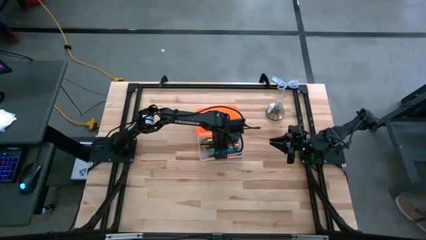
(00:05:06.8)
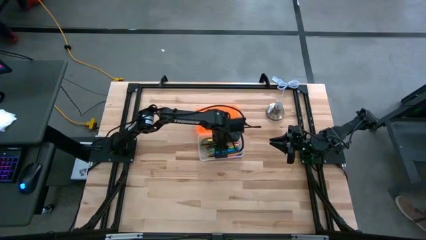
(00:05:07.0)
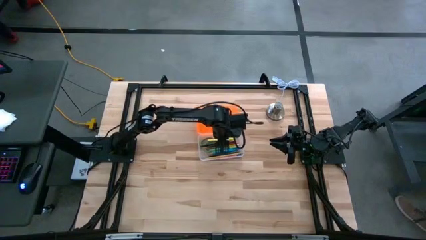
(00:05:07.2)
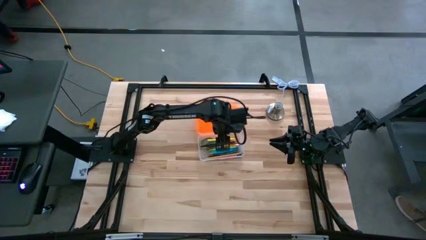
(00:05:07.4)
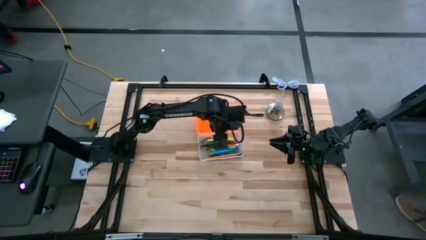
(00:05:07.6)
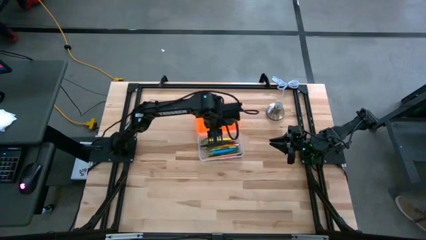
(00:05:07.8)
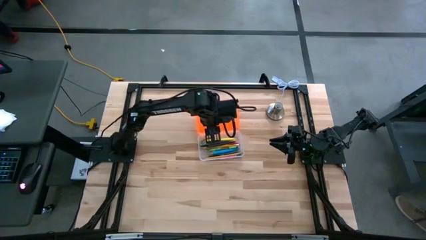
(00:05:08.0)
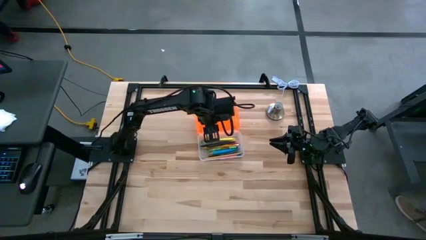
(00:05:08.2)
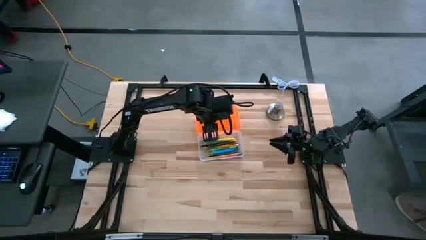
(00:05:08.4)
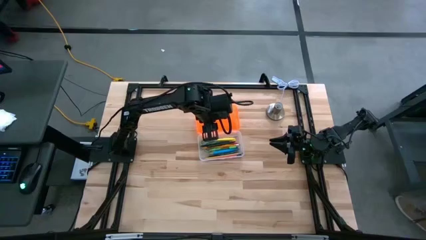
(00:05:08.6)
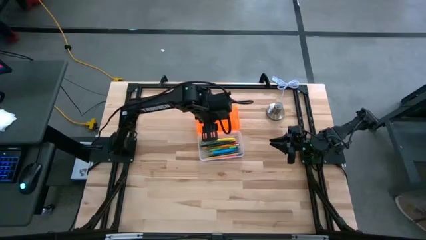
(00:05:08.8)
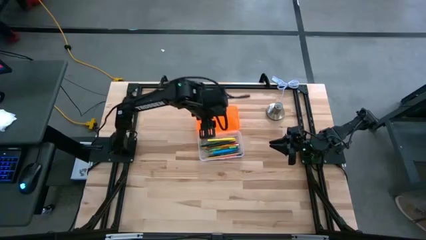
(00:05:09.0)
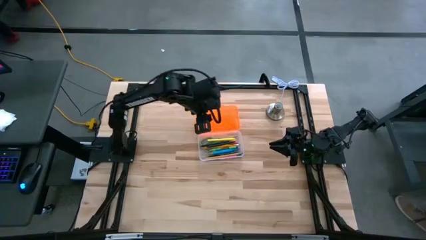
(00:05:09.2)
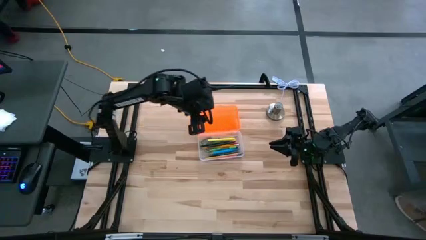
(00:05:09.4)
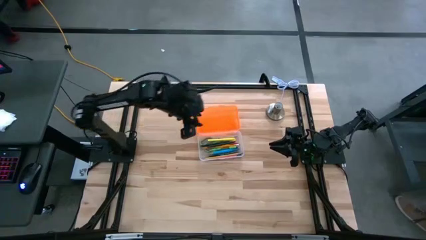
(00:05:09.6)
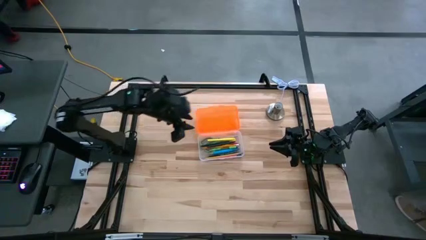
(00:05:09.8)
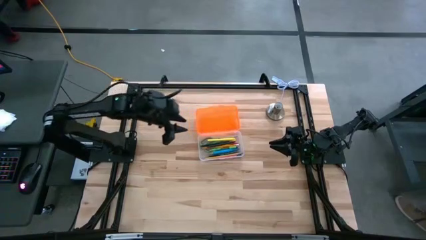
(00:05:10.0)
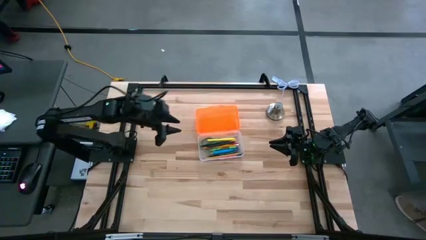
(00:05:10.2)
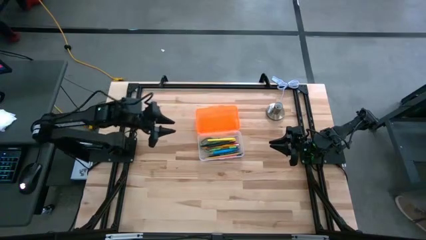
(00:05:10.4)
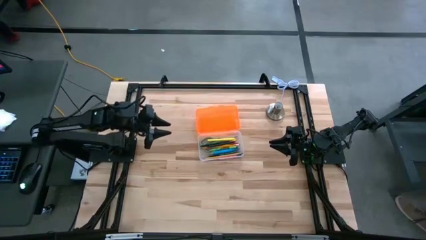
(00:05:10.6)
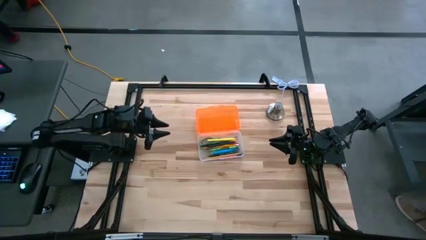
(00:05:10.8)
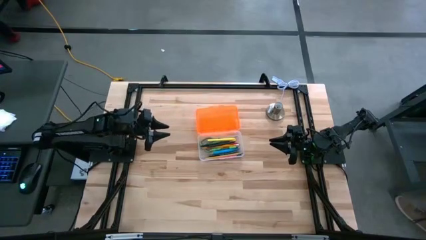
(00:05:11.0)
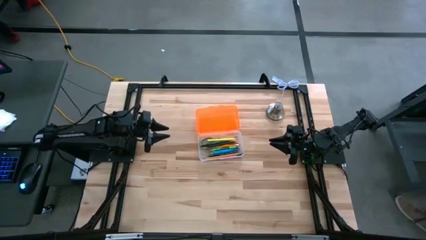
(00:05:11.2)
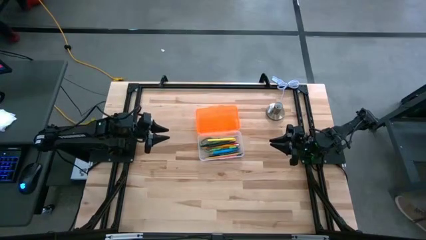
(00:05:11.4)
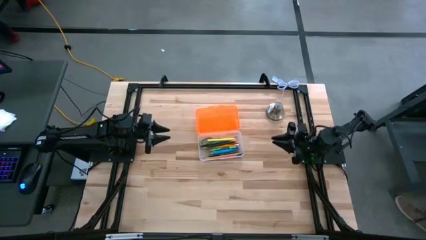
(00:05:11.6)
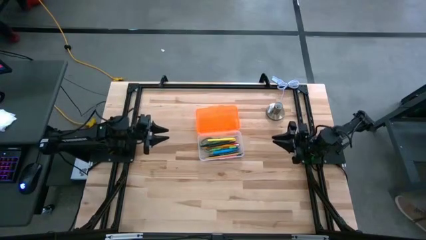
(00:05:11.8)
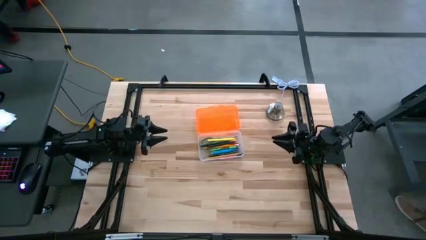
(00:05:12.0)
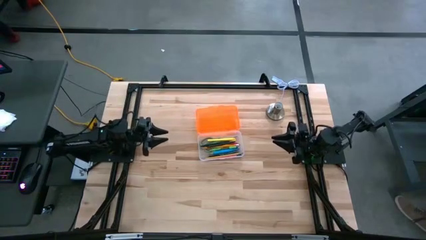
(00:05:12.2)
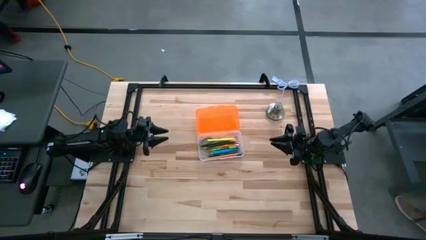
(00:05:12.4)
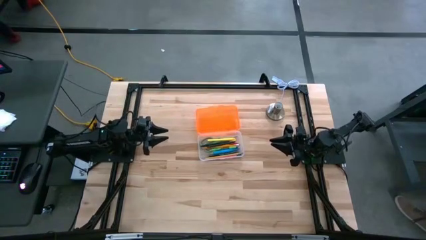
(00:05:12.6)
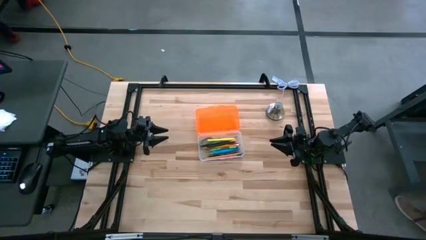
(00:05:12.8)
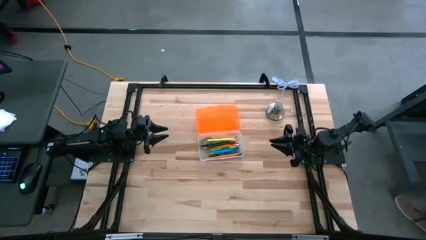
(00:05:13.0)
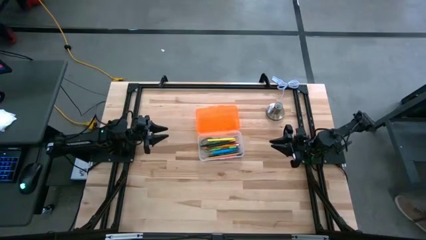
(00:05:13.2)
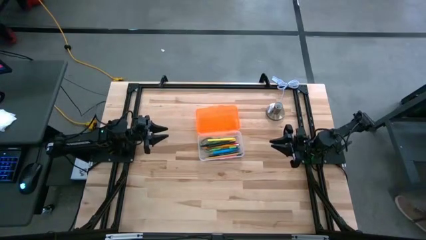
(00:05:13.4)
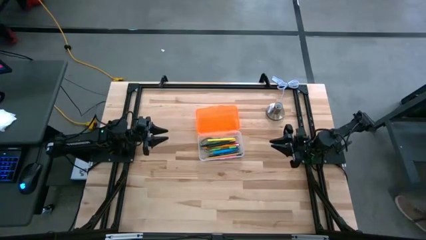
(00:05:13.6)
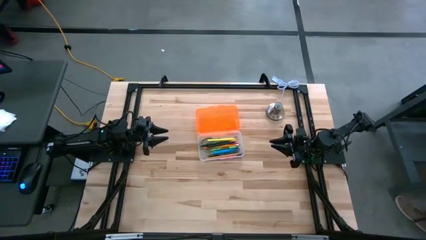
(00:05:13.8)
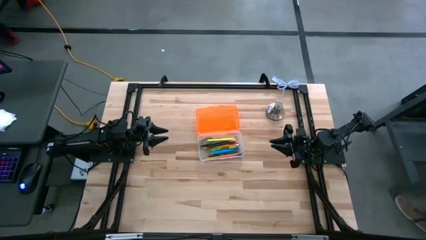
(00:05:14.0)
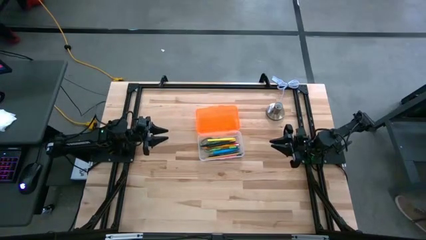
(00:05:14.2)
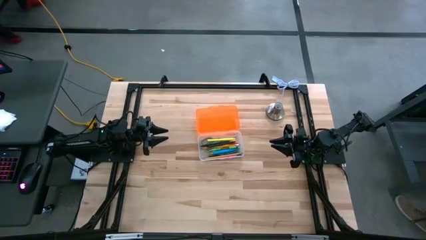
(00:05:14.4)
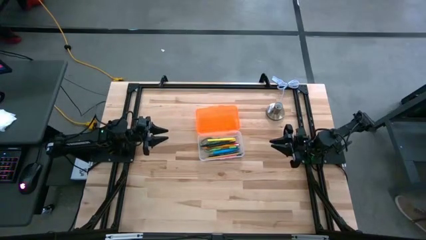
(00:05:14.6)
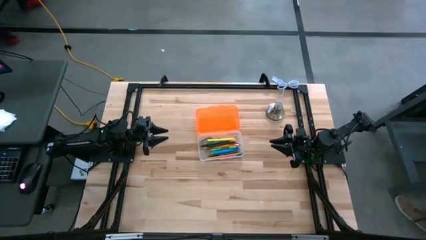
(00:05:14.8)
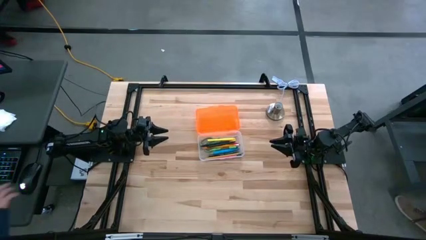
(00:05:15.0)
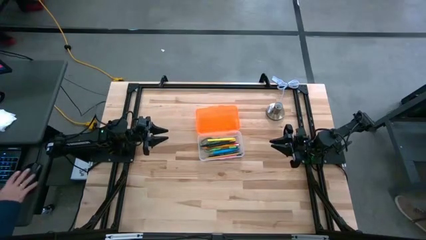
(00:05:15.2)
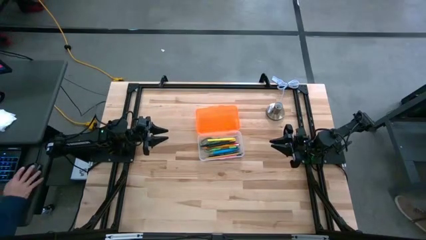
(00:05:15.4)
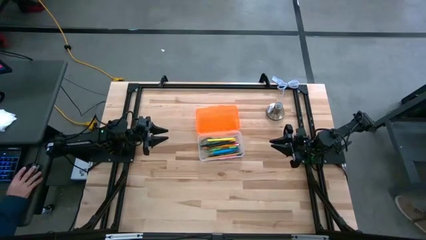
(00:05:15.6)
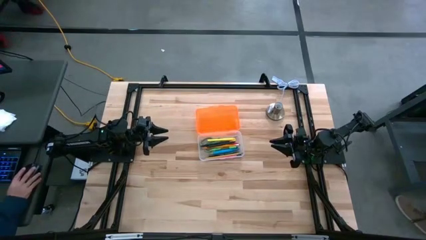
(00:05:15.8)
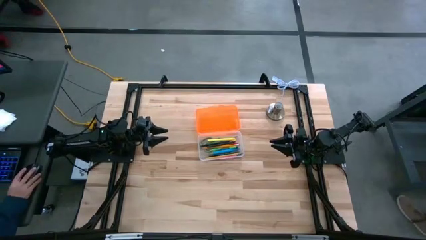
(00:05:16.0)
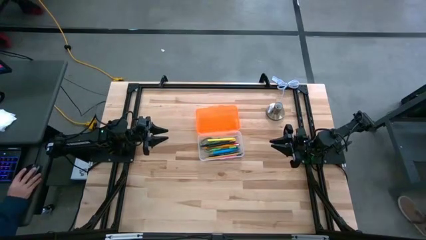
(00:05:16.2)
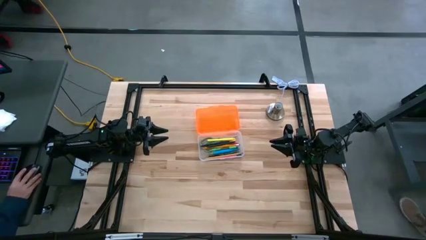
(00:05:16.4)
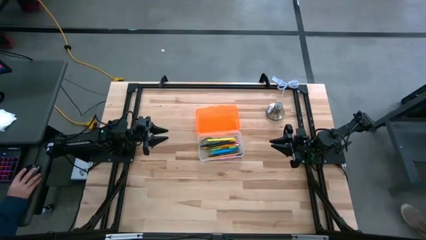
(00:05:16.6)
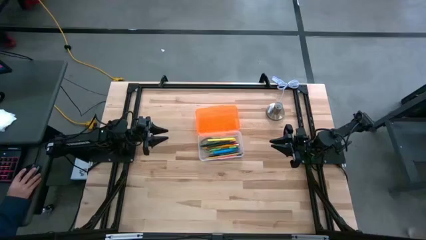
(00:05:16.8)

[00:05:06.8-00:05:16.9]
Task: Pick & place school supplies into a supply box
Return to Home Position

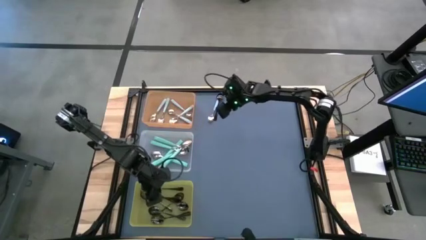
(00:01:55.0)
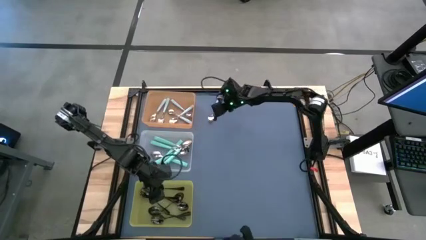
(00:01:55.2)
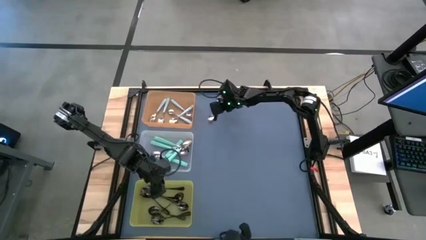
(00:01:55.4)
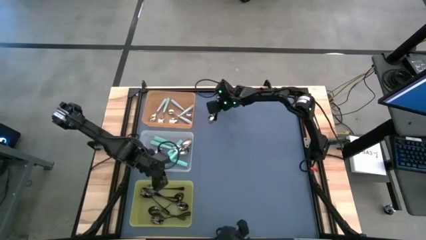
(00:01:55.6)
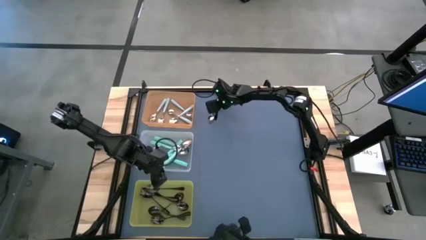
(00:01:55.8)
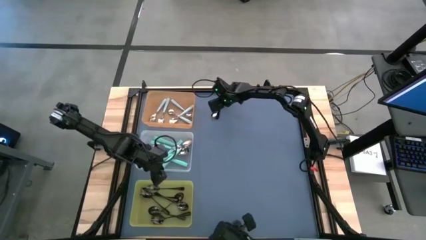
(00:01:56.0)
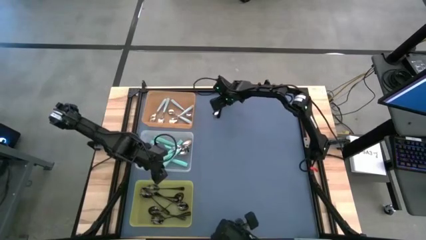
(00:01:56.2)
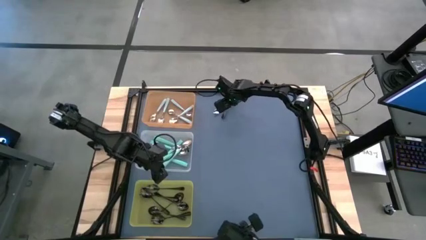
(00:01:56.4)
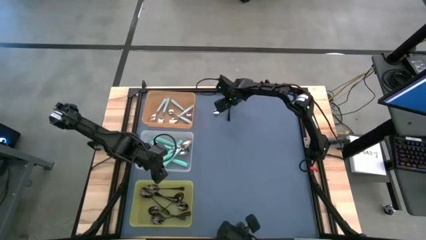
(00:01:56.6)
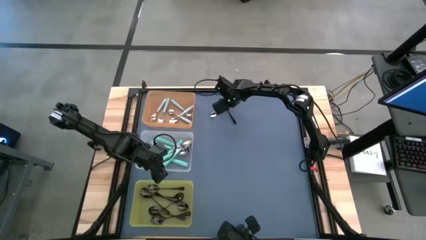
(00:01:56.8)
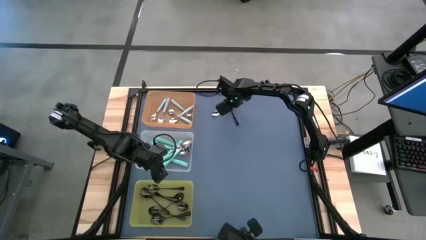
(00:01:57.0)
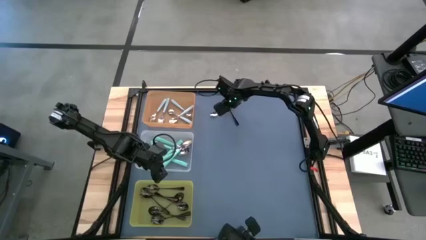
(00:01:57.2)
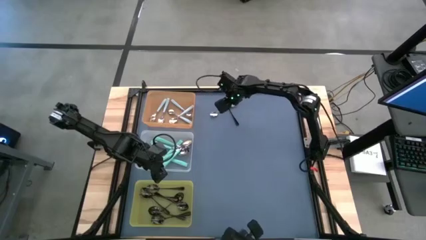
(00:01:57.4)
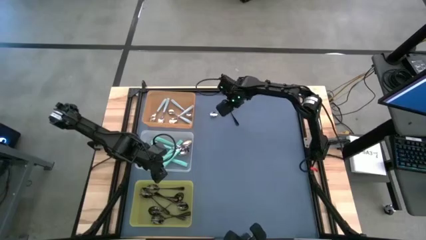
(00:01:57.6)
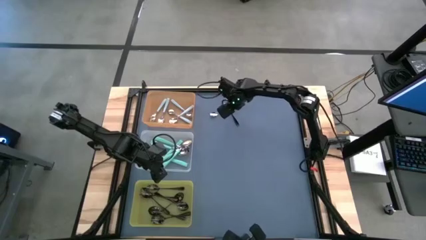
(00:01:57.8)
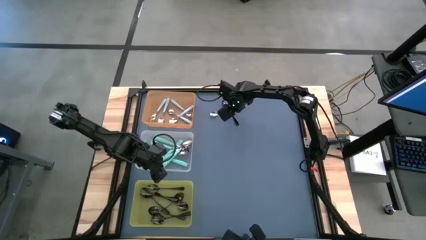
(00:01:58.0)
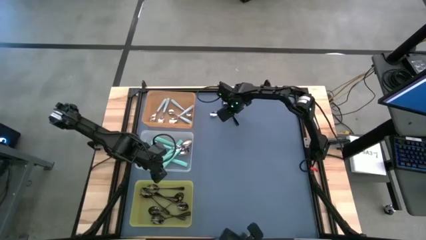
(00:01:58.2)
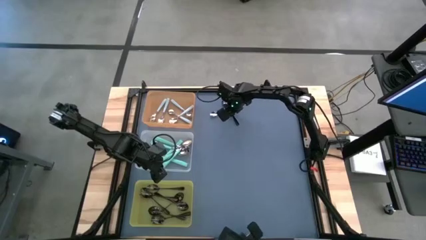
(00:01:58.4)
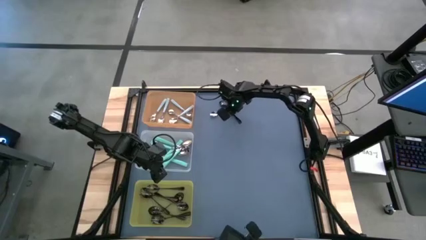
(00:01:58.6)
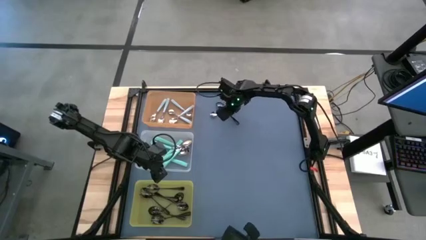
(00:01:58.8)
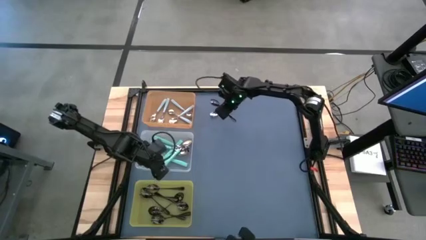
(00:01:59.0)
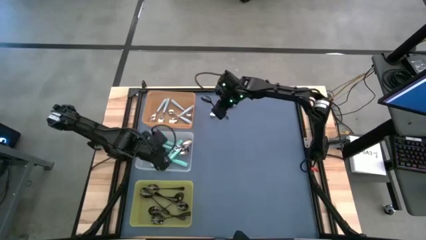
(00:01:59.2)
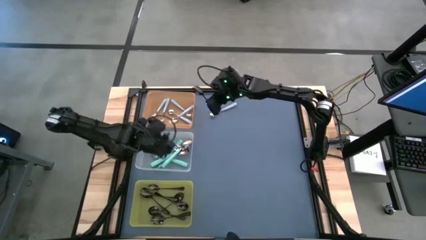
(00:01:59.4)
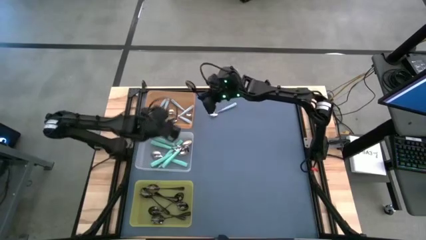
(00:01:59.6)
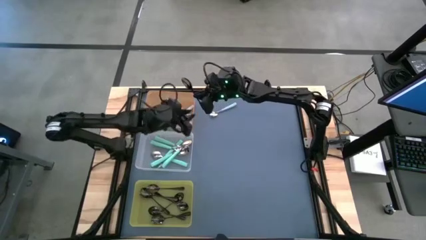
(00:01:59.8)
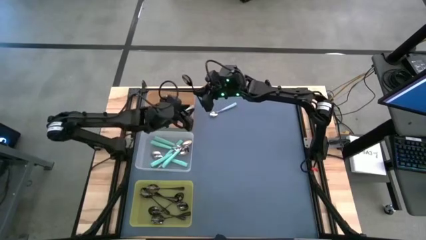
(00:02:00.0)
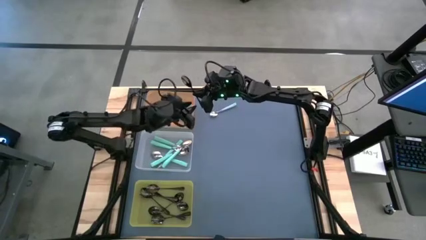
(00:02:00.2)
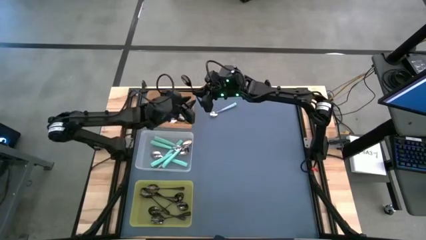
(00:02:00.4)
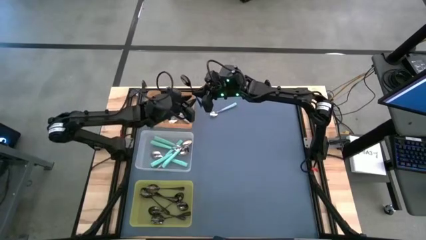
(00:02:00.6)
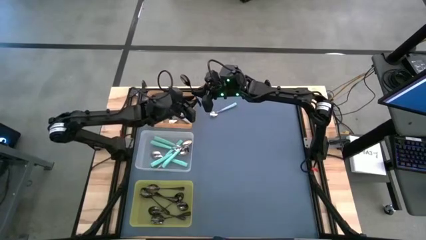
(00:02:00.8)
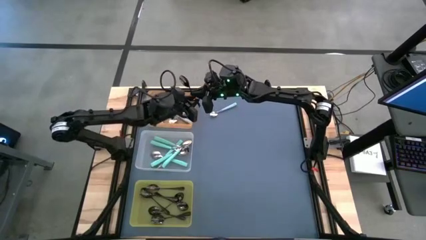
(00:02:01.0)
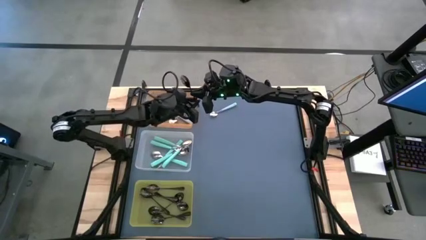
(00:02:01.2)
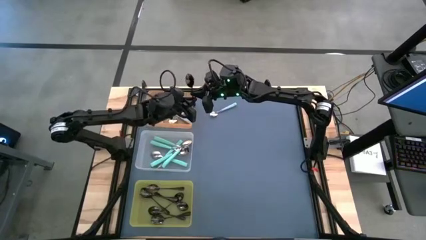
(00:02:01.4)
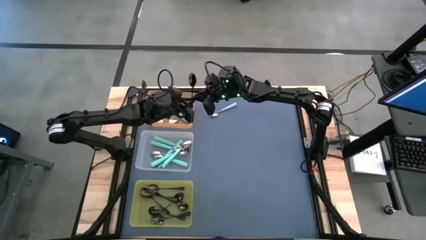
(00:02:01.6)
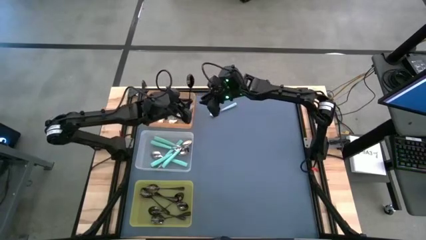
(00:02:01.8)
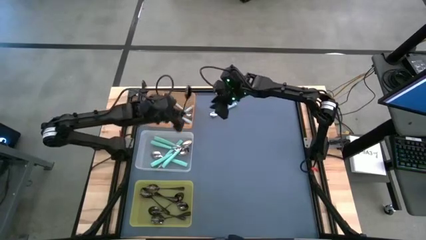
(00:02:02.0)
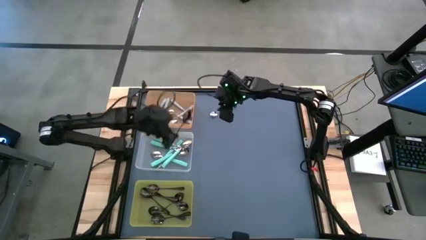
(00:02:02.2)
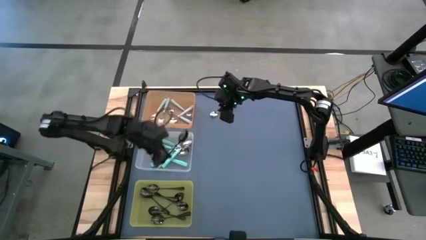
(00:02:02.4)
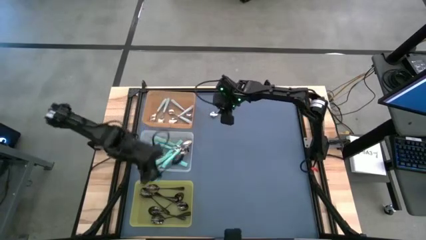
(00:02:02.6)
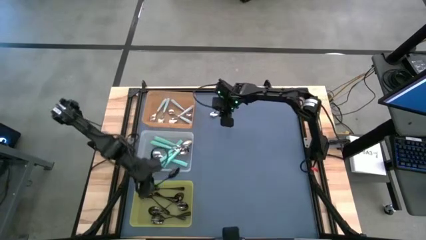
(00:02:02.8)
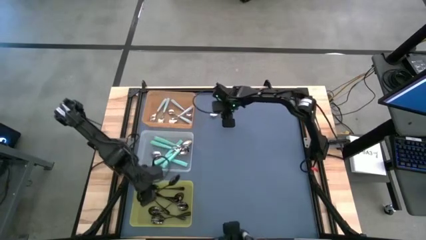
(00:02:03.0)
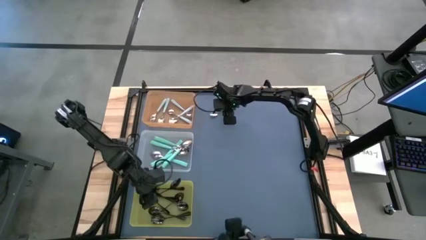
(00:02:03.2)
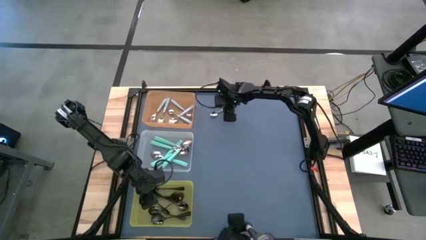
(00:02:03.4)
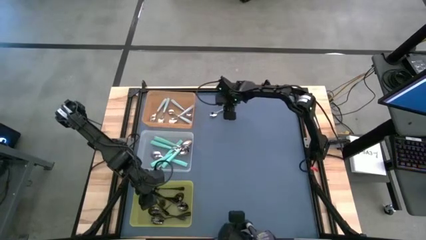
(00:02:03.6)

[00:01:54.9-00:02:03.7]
Task: Sort silverware by color (type)
Put the black spoon into the yellow bin
